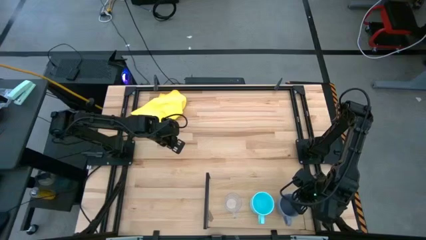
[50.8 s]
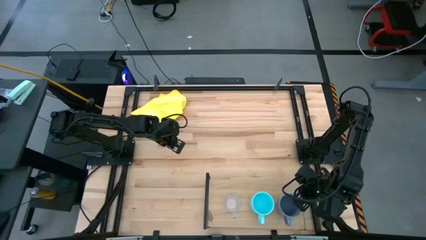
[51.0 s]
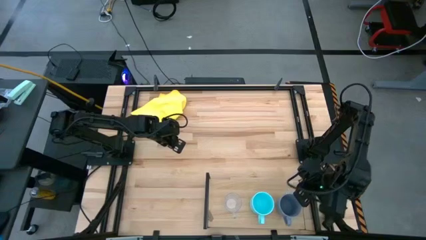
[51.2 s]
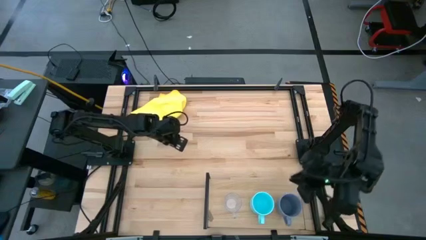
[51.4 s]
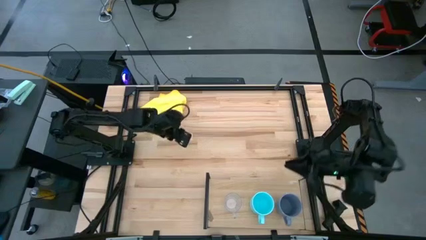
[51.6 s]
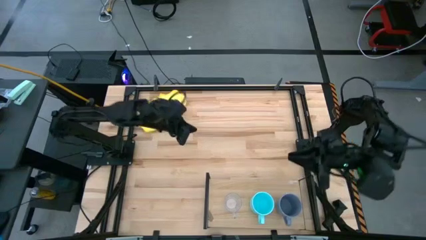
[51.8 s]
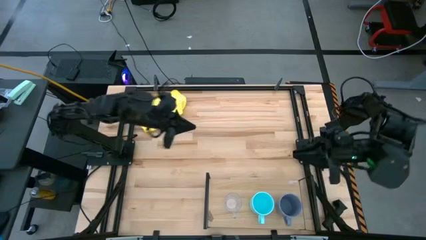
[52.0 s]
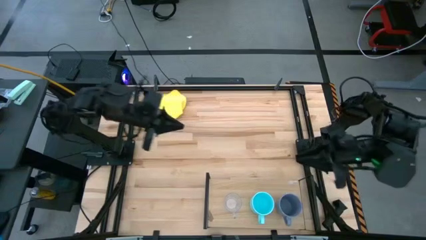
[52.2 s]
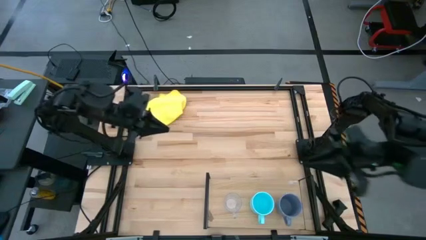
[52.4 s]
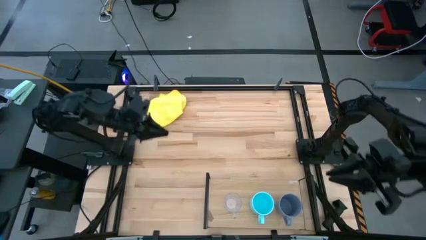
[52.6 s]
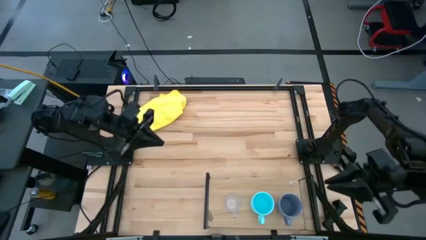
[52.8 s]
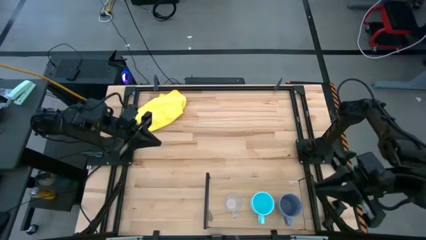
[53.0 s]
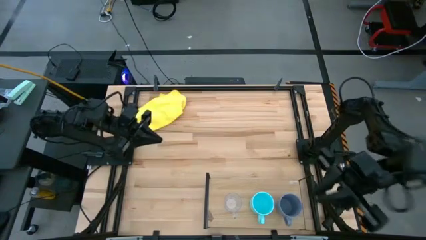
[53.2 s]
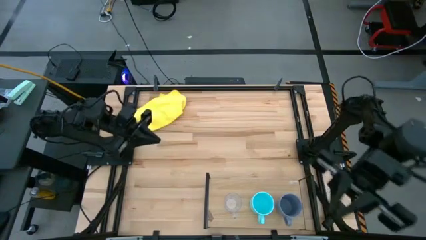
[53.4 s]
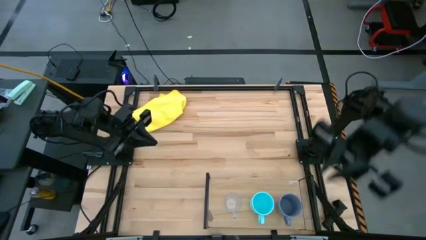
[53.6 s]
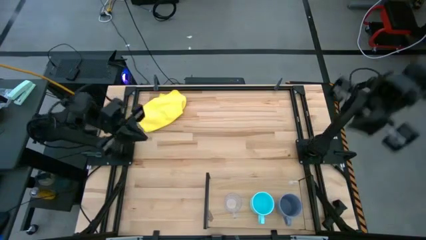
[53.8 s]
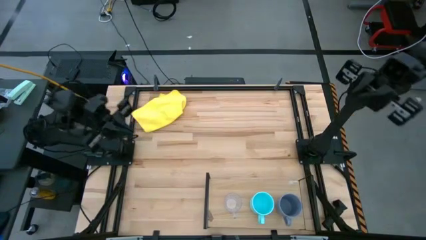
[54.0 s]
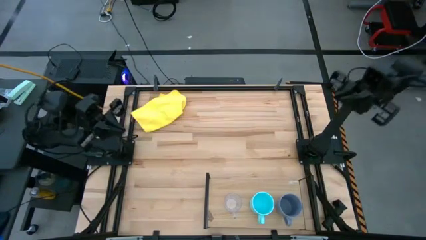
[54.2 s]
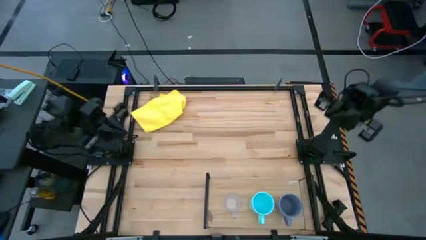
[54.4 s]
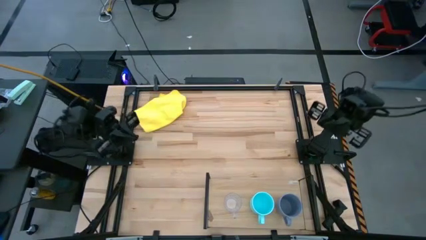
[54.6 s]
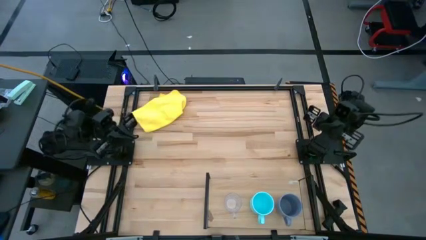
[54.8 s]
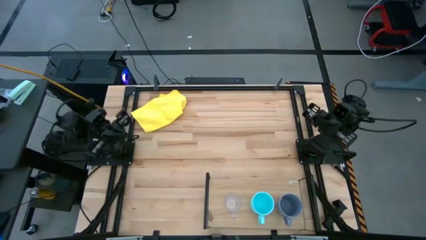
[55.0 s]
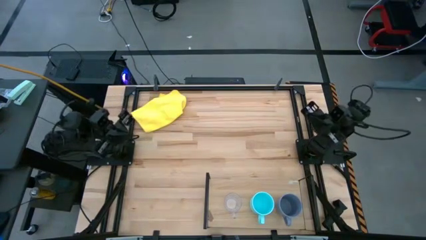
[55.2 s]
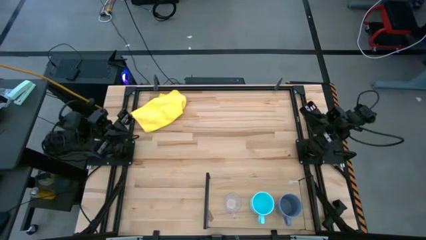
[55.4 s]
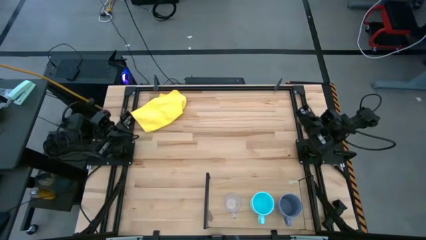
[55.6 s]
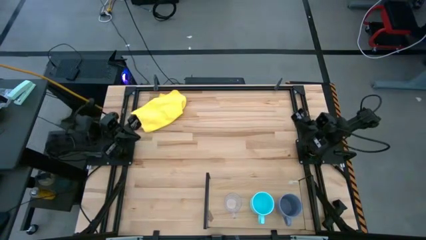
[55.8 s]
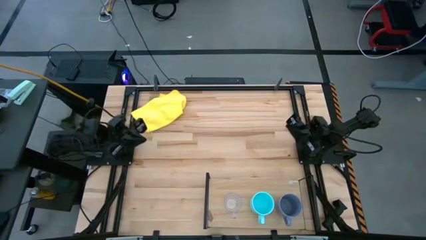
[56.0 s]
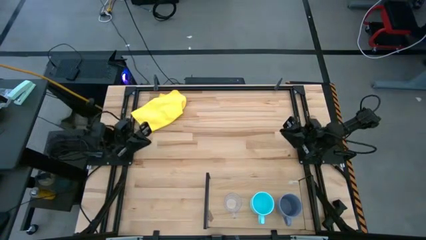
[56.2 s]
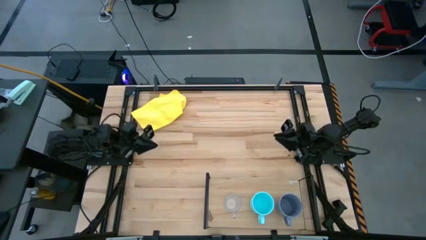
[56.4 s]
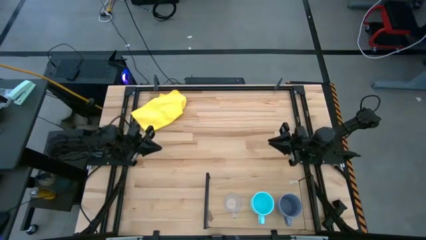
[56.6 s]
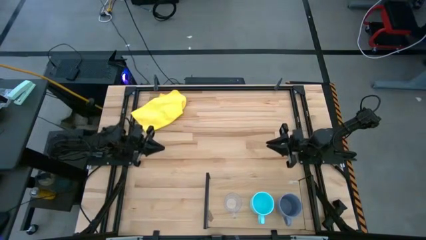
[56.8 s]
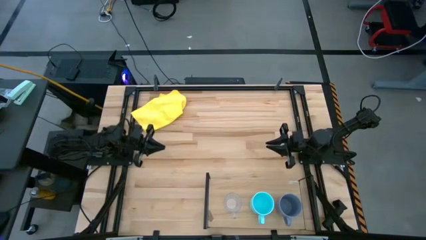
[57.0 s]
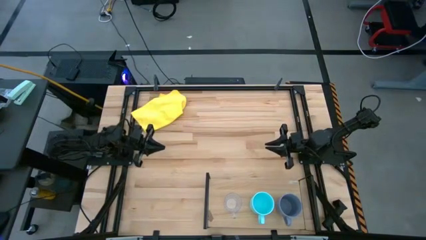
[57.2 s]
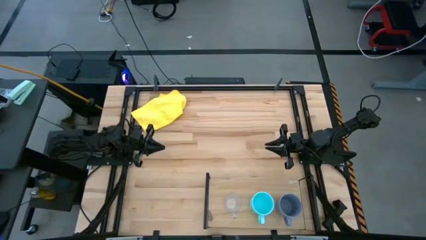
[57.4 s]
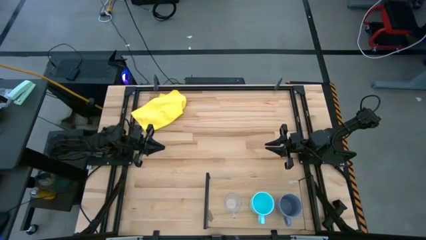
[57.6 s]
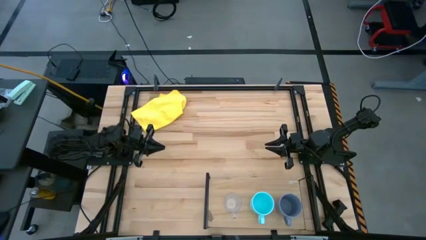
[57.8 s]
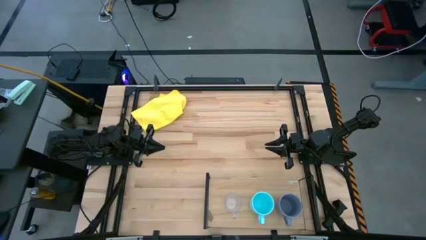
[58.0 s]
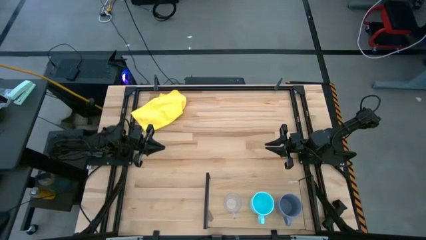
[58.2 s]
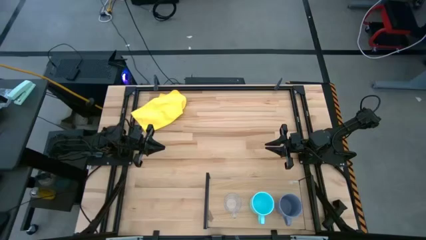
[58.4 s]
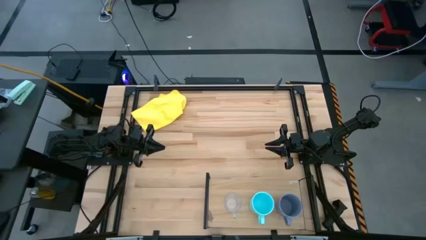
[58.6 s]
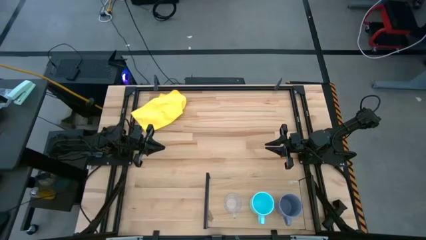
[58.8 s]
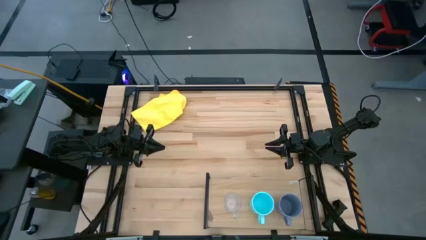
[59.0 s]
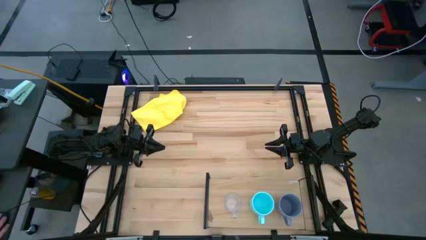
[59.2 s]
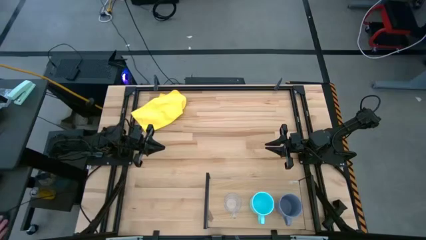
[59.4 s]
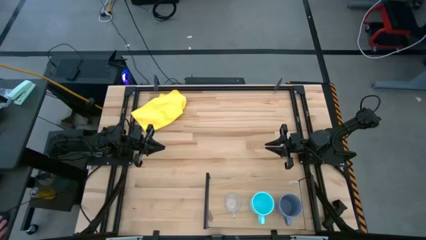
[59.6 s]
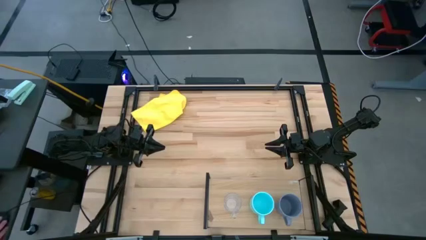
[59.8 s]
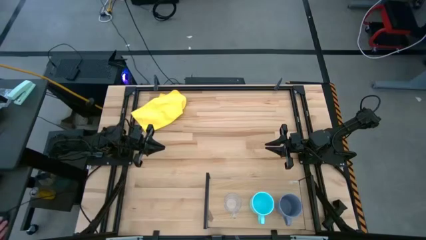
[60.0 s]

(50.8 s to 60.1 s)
Task: Stack small to large cups/mugs on shelf
Return to Home Position

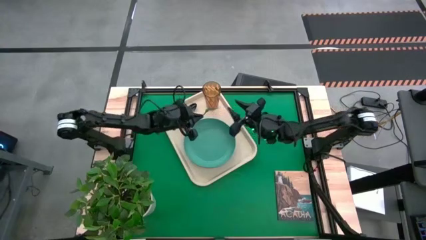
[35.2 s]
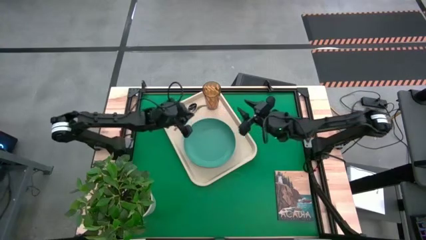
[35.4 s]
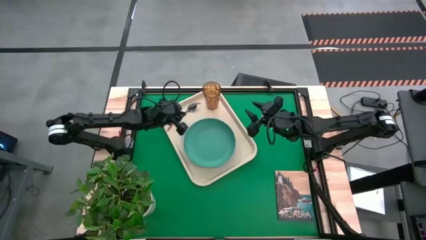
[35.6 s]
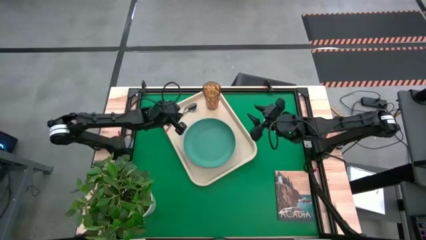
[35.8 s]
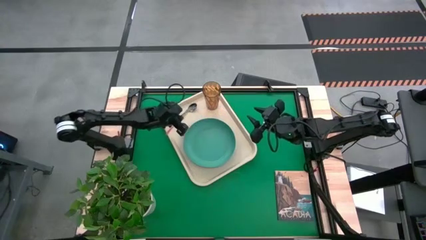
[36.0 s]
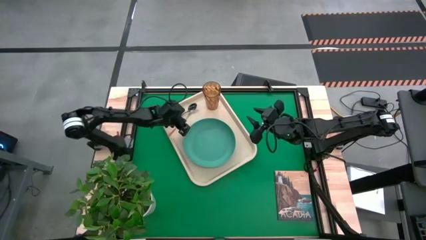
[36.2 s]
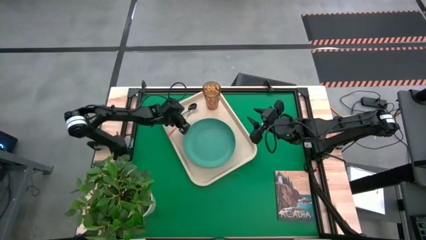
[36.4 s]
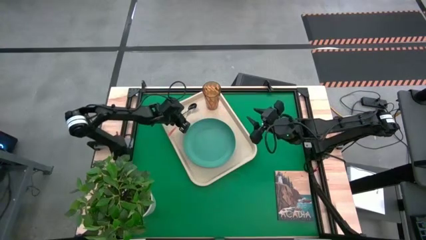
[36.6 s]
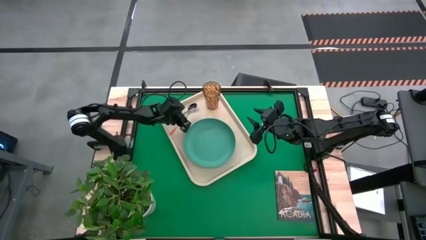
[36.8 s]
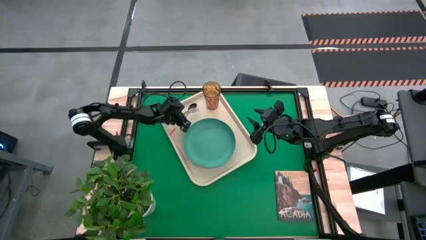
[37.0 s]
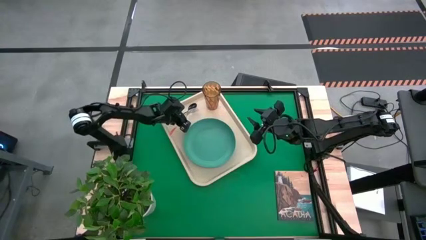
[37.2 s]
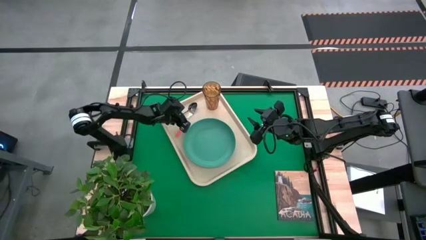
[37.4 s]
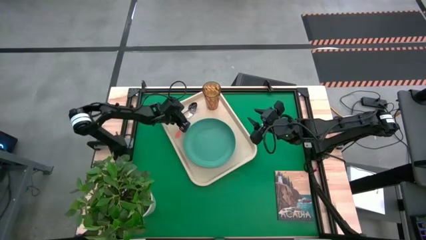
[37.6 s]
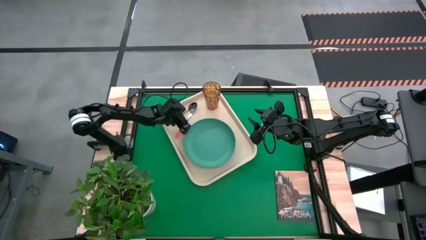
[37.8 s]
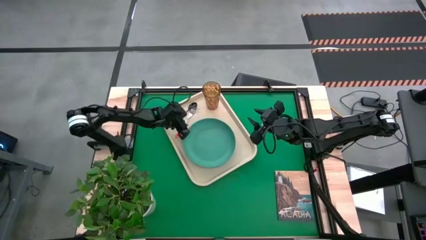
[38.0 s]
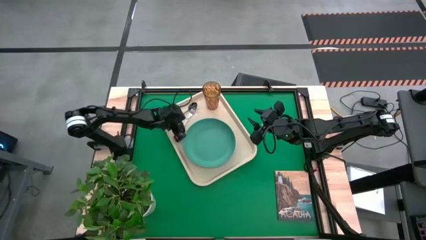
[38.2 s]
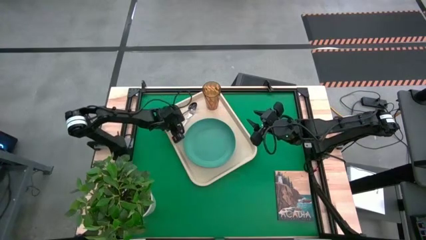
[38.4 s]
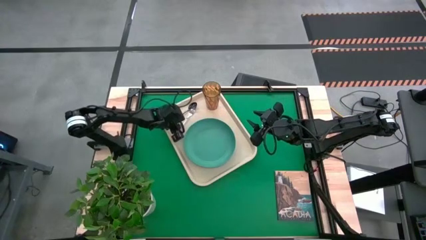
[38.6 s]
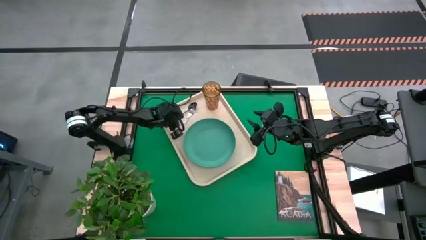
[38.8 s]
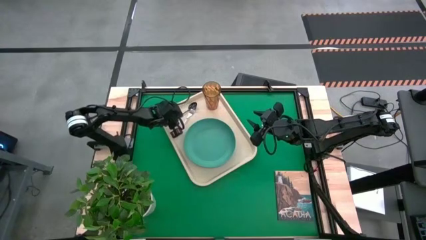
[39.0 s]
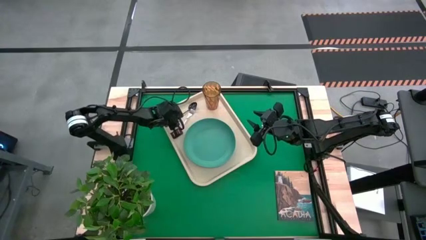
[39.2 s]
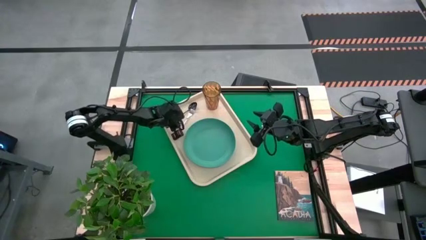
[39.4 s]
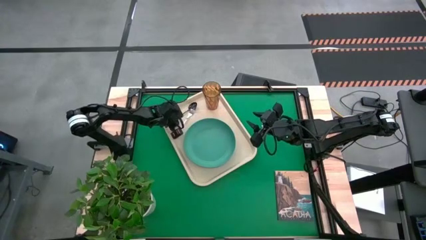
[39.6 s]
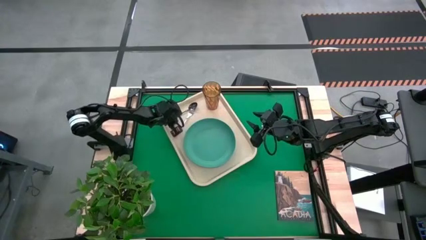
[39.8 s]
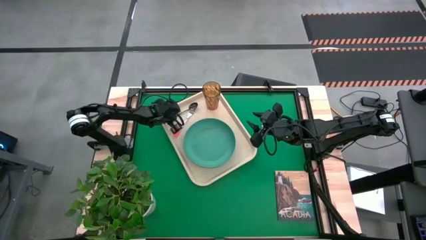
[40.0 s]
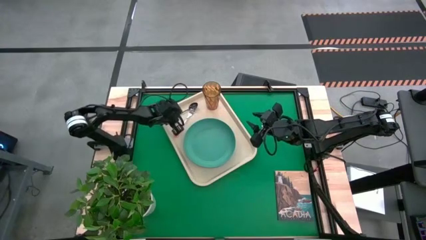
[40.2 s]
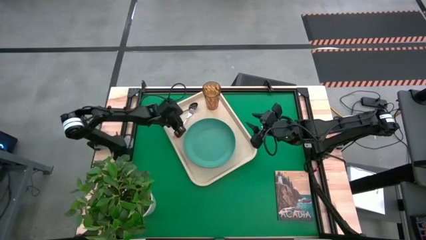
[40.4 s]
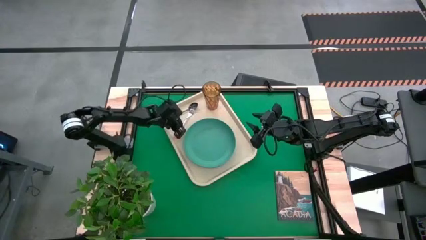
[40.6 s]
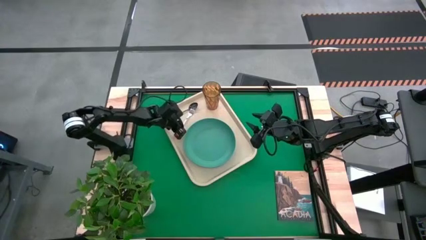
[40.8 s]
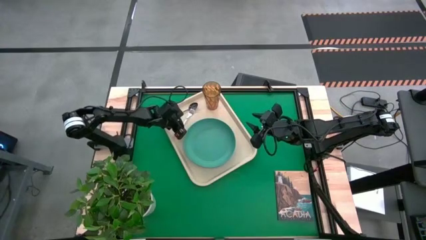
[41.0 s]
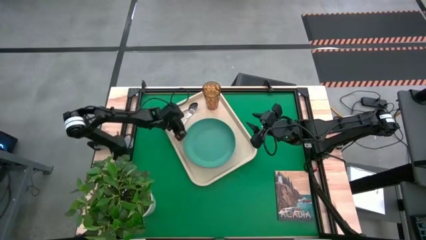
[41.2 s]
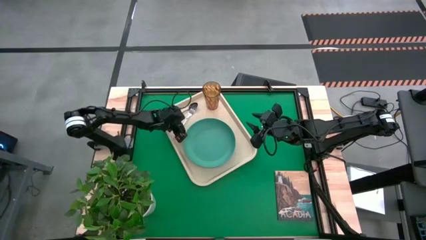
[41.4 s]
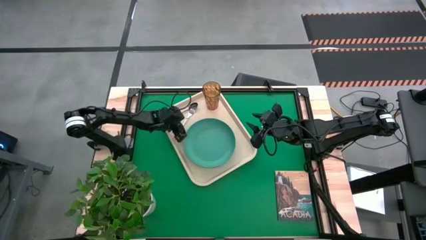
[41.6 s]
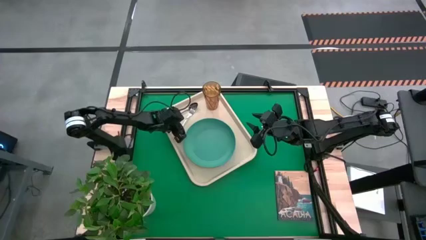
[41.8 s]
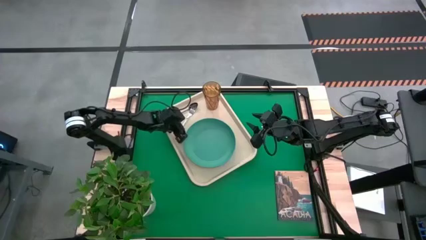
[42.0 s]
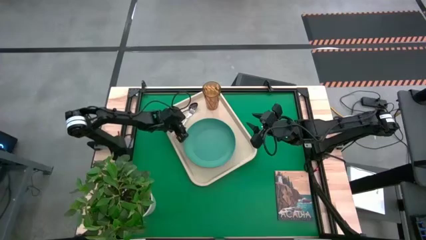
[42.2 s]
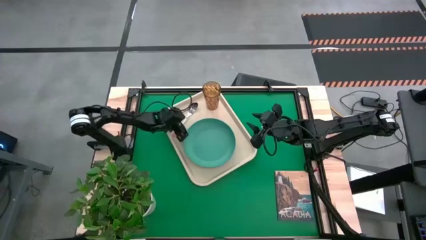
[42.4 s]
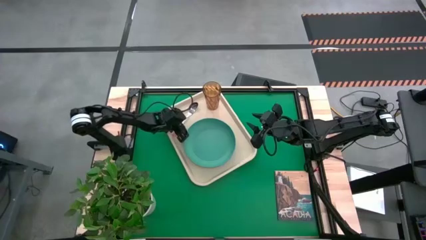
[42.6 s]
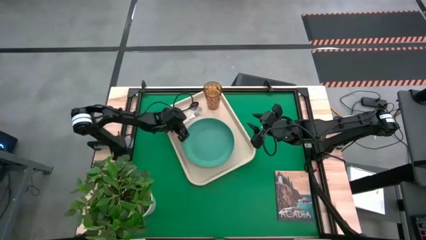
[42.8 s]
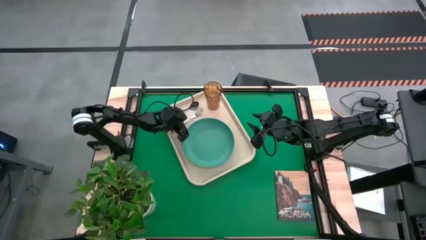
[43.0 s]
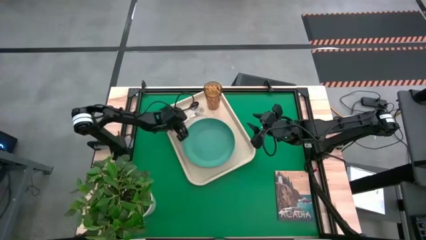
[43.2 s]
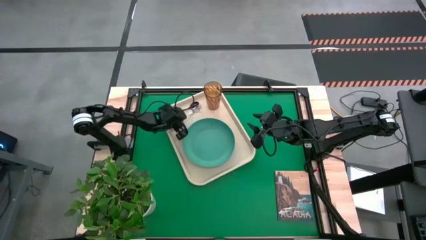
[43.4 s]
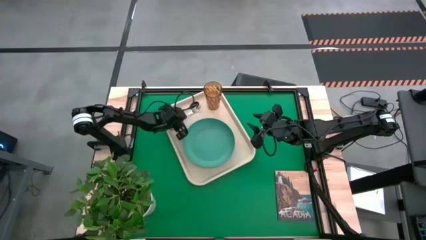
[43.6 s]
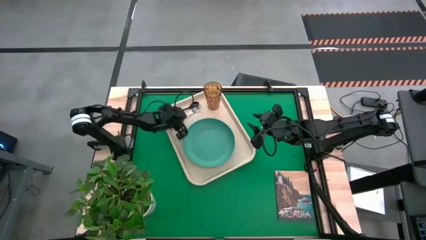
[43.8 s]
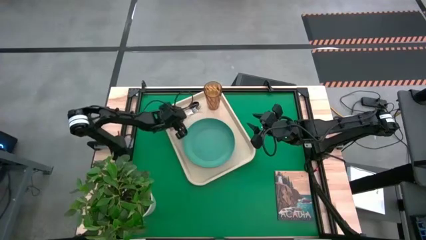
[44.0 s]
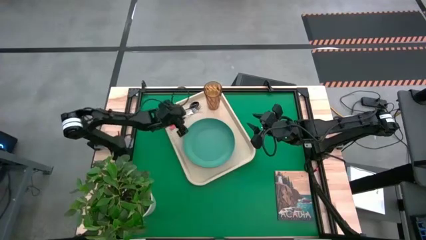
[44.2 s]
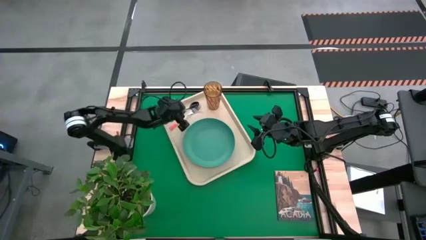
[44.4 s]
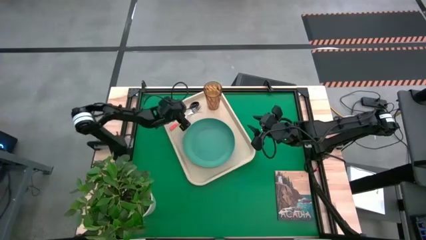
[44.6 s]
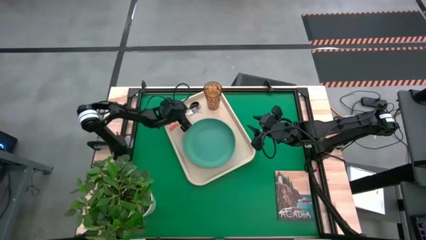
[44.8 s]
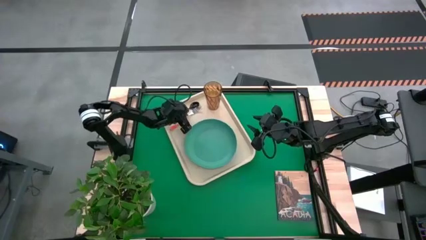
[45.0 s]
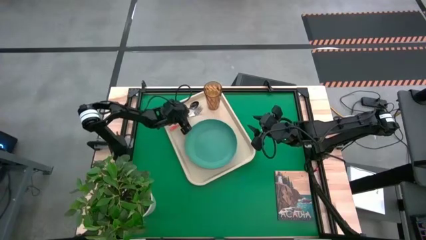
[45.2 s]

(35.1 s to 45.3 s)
Task: Pick and place plate/cup/fork/spoon on tray
Put the orange fork on the white tray under the black spoon
